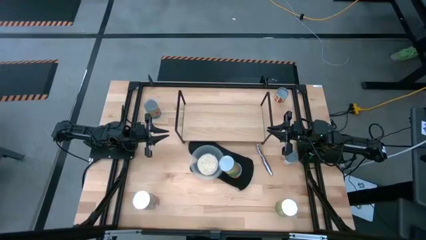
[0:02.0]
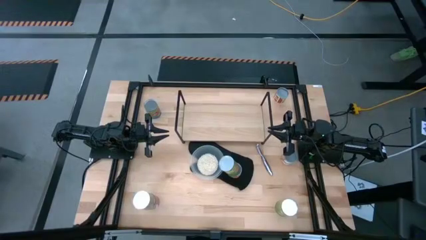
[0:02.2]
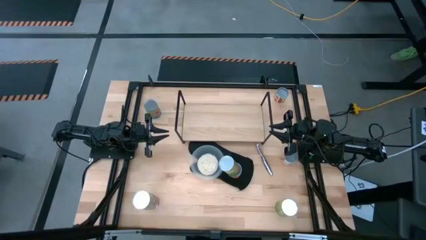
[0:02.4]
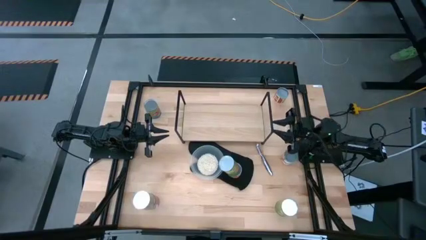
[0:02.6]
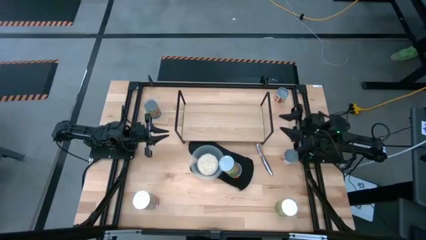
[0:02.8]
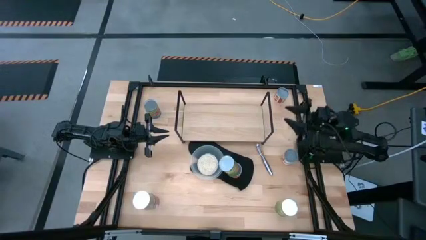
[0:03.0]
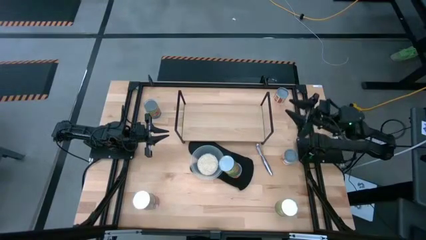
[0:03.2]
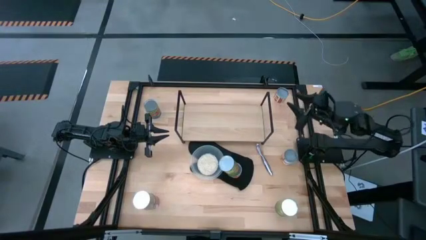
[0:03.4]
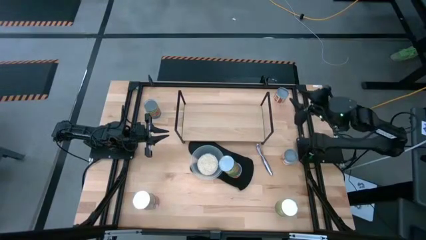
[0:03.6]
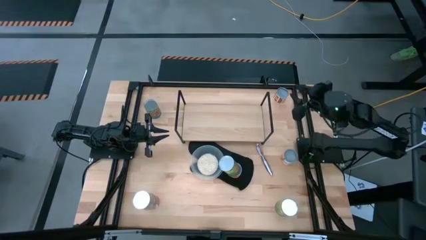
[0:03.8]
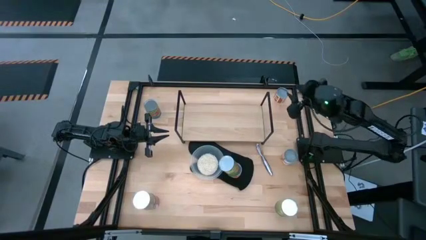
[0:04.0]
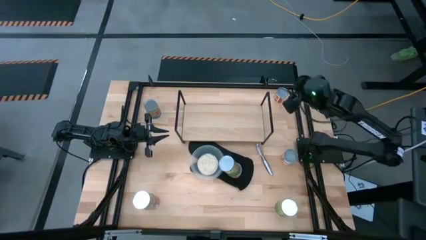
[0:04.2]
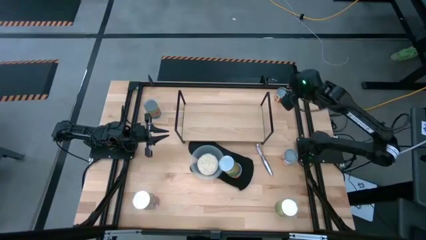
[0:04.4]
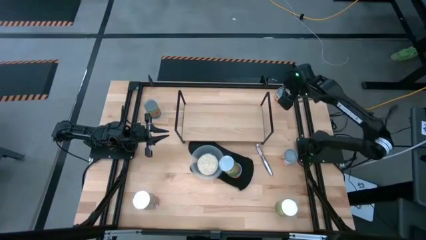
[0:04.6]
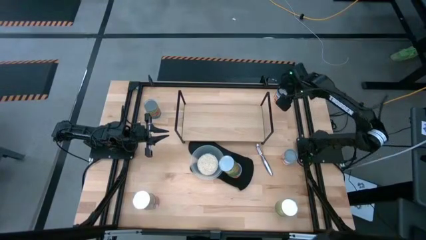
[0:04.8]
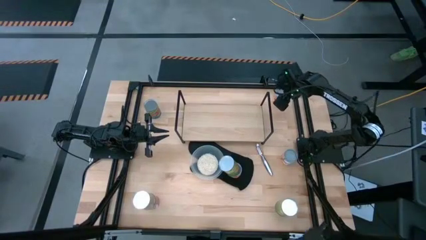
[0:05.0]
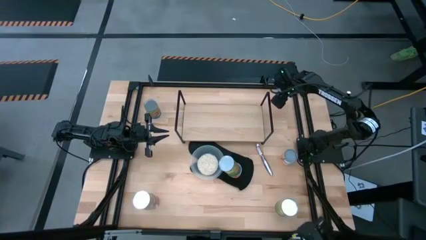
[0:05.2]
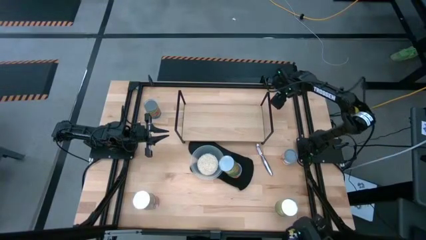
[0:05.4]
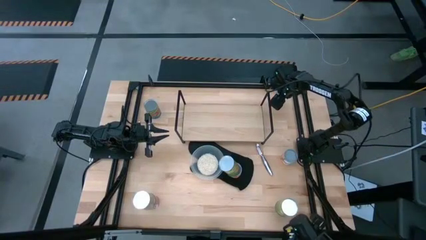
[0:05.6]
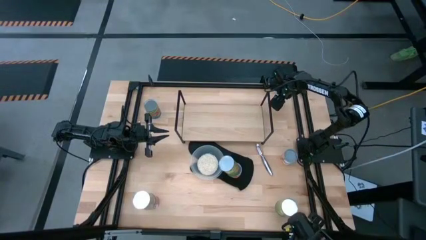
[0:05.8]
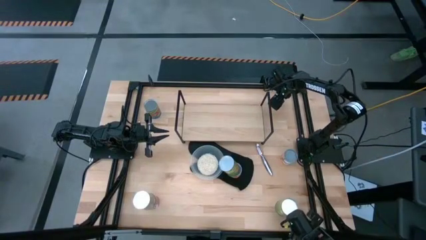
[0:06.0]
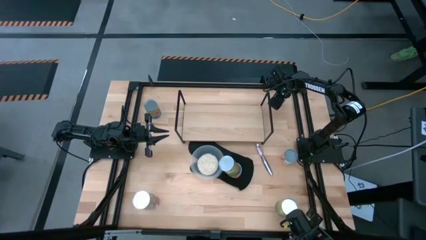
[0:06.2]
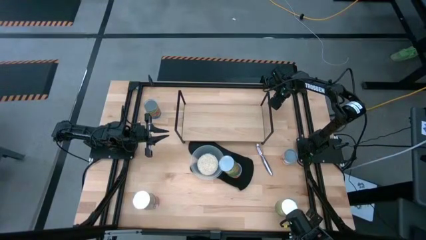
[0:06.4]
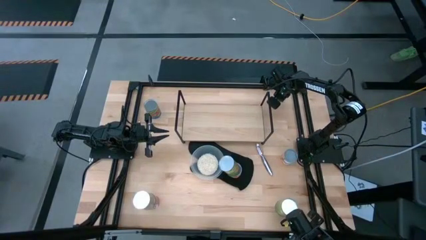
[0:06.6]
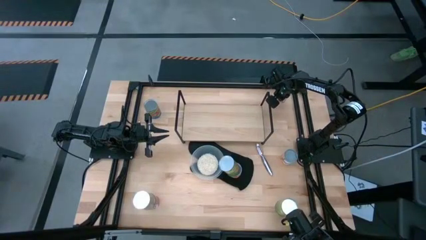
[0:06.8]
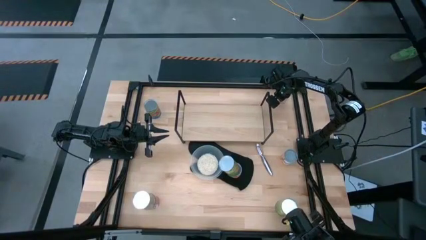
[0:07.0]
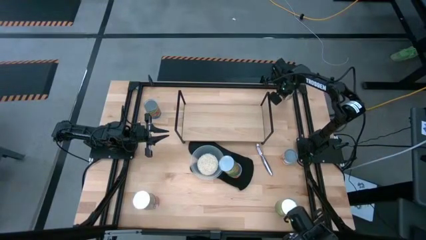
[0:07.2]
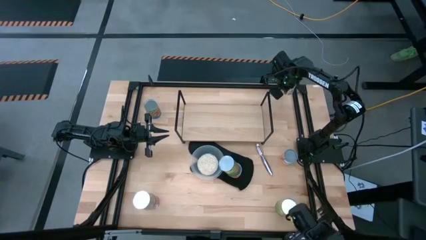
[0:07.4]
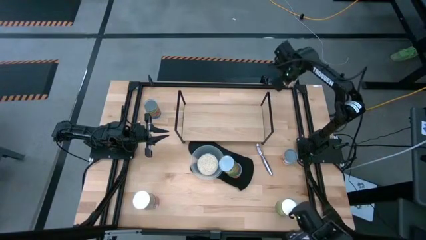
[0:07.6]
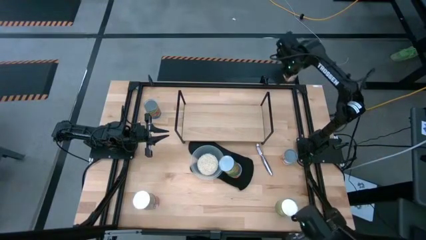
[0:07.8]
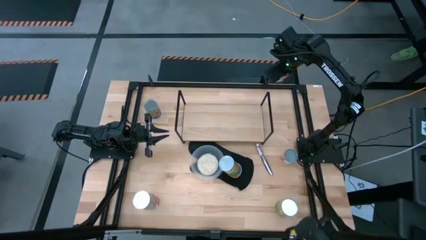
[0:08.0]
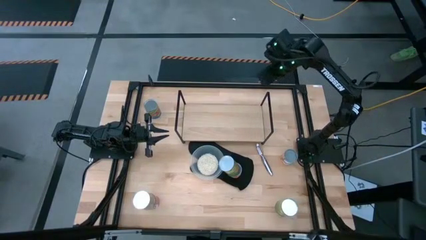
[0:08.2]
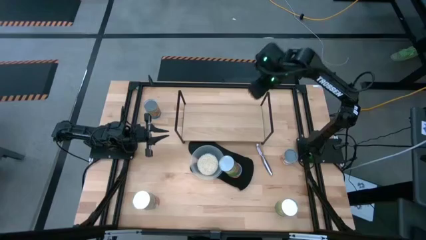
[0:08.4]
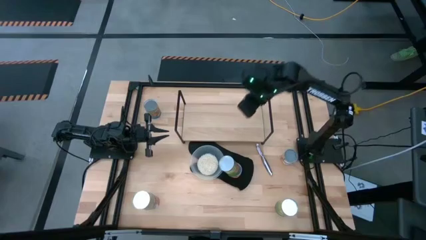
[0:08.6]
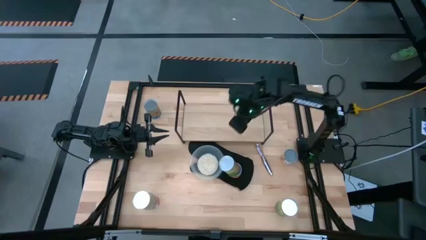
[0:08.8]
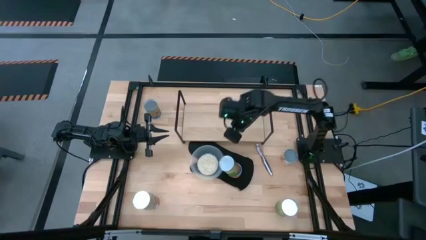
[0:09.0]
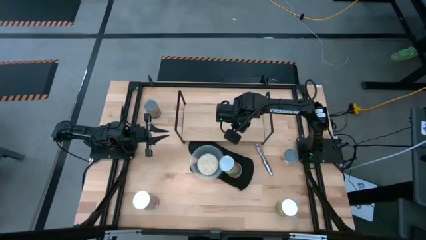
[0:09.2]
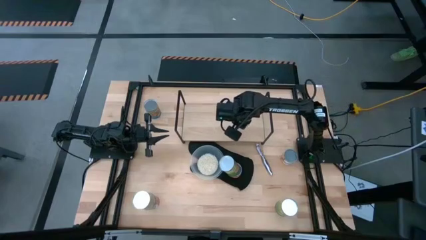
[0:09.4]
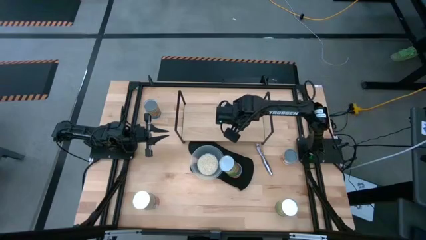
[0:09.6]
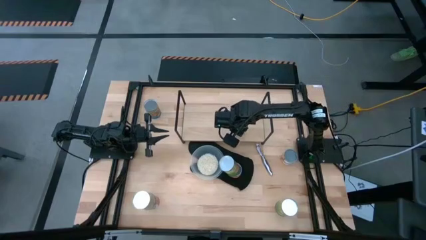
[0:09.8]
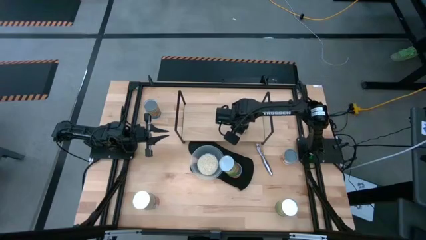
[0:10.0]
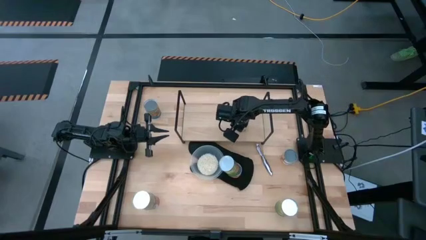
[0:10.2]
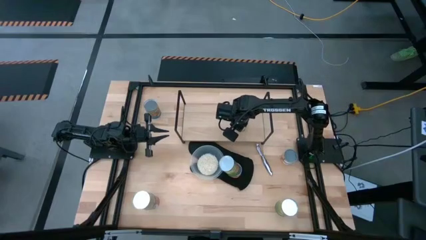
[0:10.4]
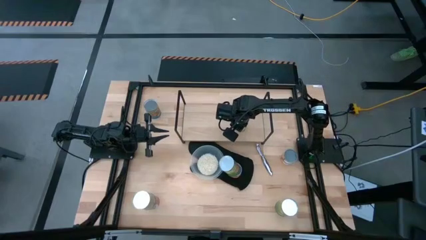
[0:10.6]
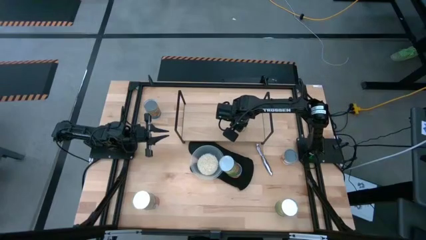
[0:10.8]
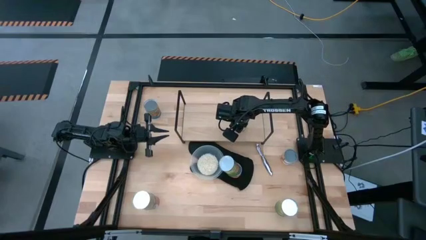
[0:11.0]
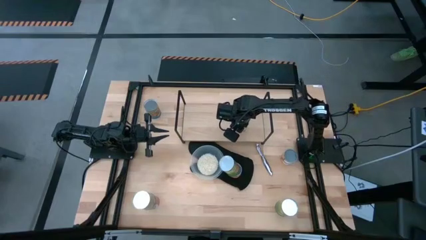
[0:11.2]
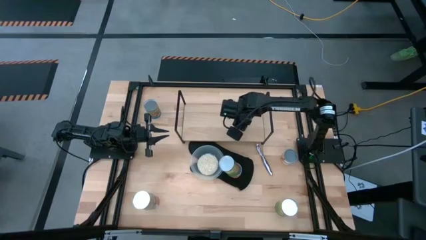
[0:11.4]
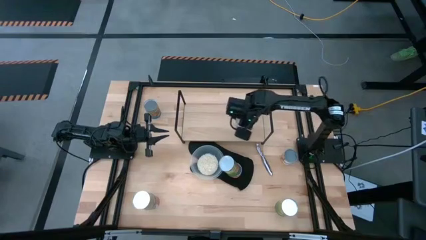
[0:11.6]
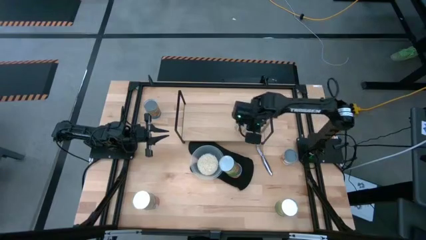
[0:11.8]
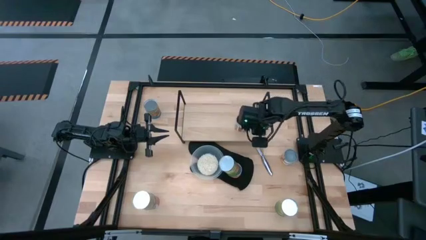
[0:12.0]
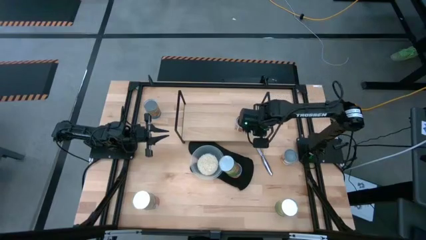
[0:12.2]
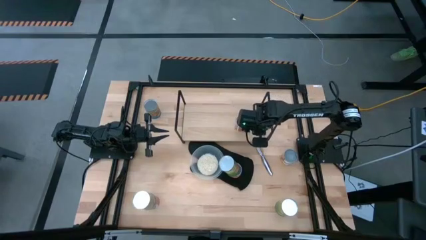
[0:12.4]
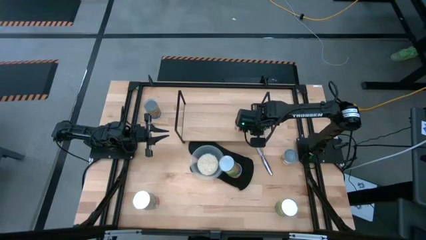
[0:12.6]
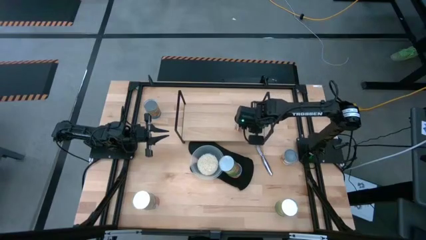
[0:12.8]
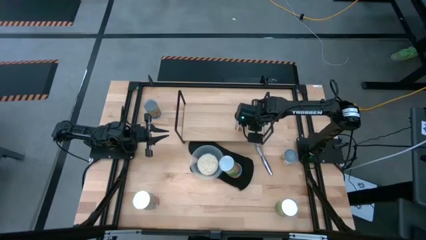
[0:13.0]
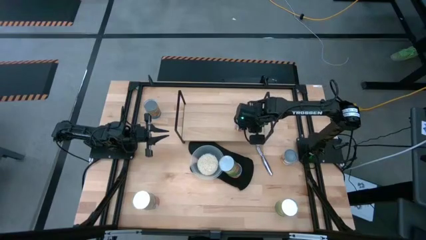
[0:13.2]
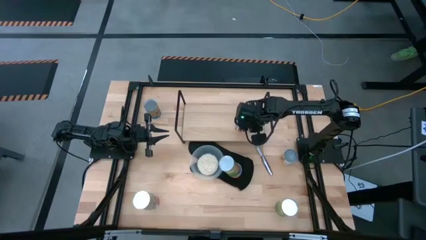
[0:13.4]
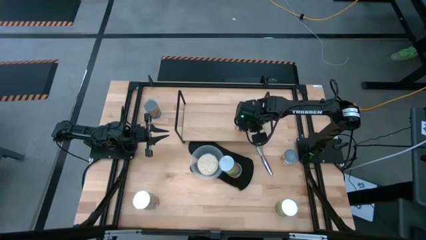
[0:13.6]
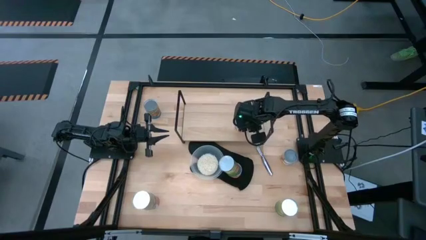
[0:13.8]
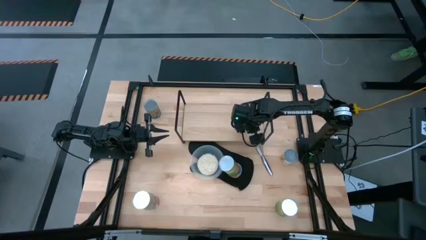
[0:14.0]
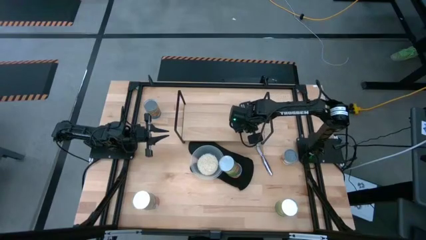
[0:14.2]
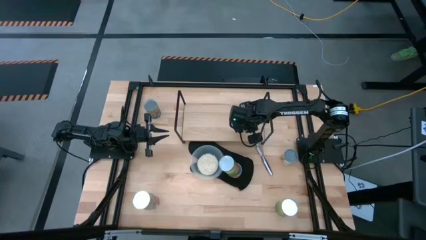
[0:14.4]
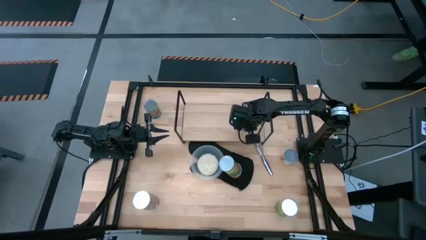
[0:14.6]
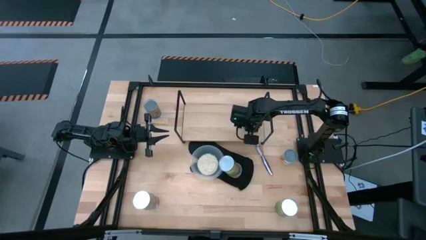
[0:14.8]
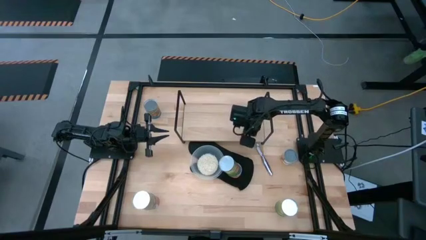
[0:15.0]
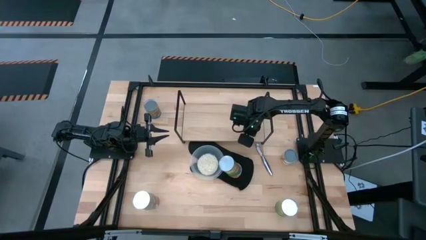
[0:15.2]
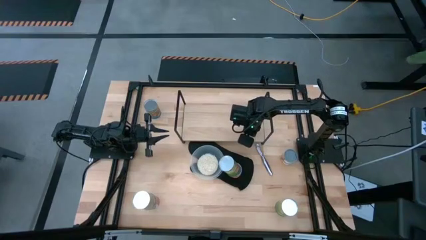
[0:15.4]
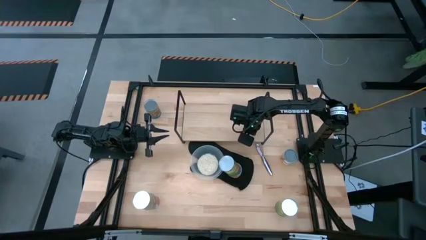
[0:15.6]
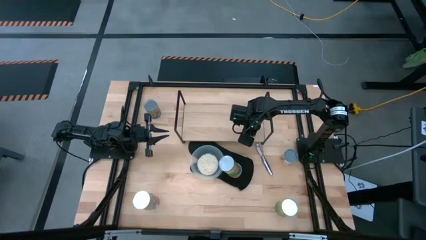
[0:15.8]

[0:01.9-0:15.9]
Task: Pick and place cans onto a shelf
Put the canned diced tomatoes on the shelf
